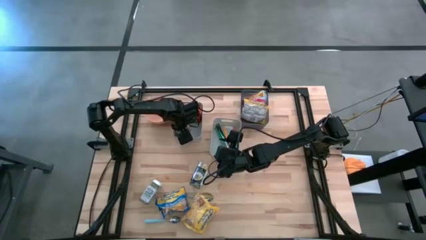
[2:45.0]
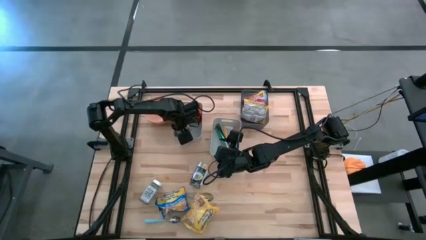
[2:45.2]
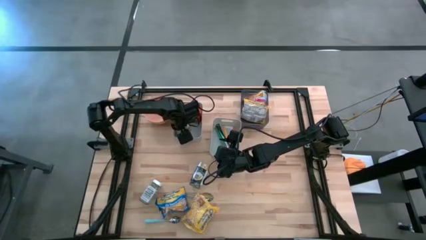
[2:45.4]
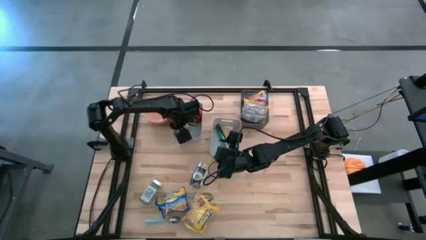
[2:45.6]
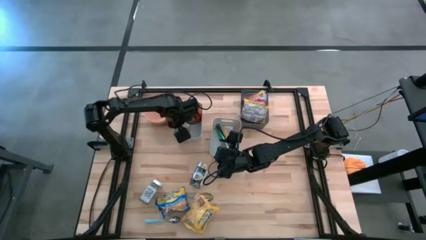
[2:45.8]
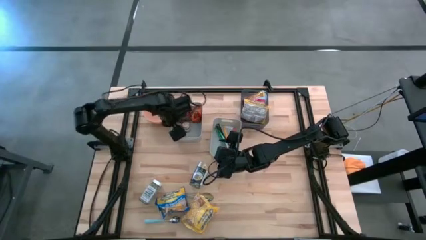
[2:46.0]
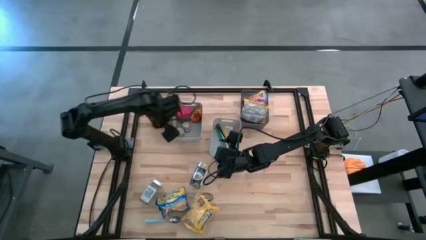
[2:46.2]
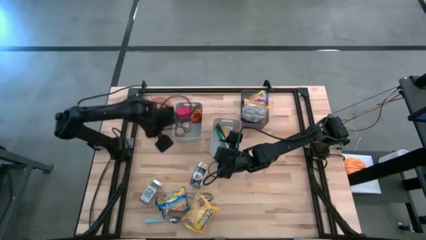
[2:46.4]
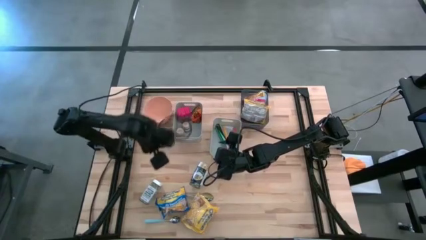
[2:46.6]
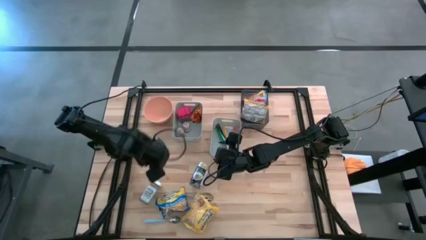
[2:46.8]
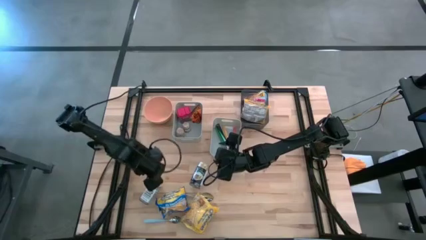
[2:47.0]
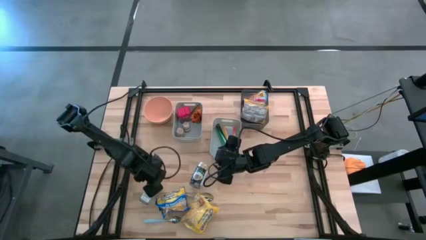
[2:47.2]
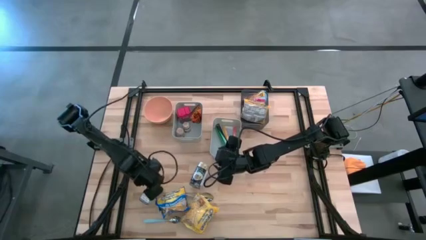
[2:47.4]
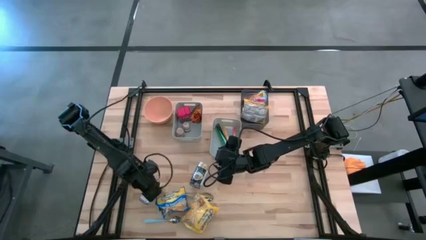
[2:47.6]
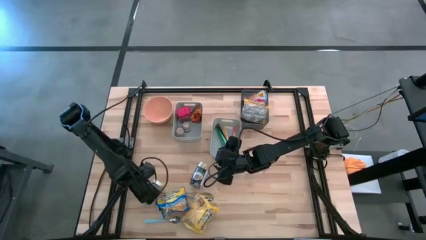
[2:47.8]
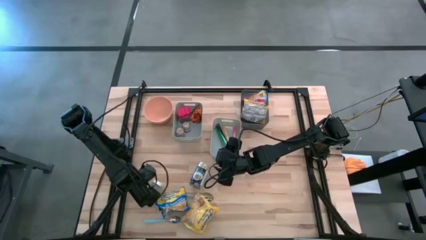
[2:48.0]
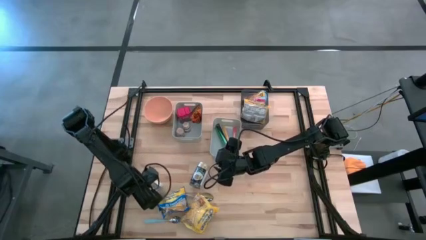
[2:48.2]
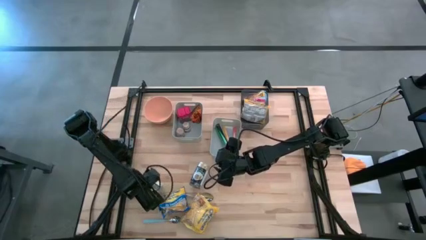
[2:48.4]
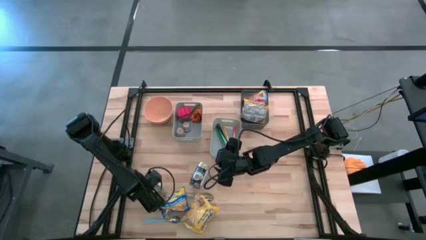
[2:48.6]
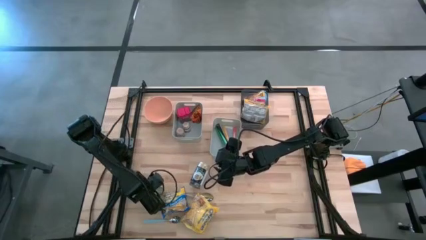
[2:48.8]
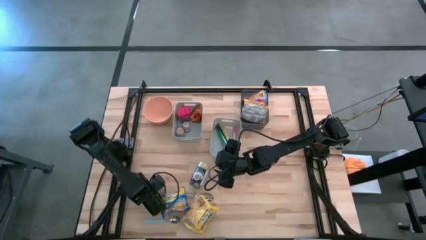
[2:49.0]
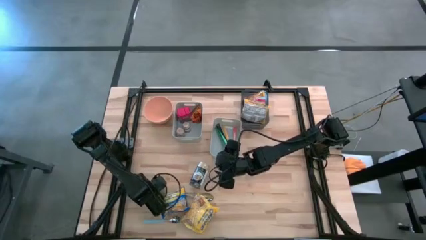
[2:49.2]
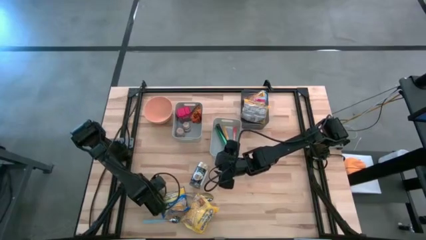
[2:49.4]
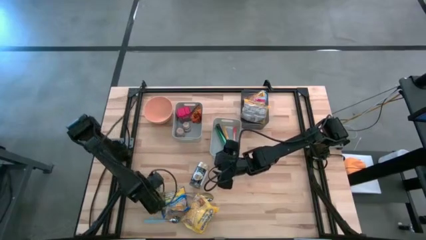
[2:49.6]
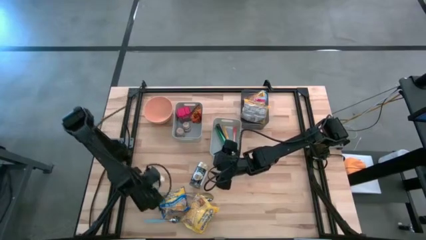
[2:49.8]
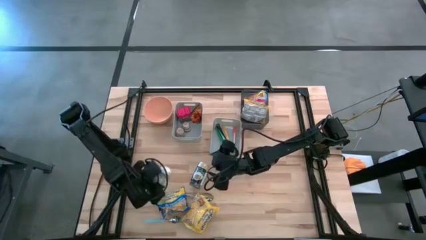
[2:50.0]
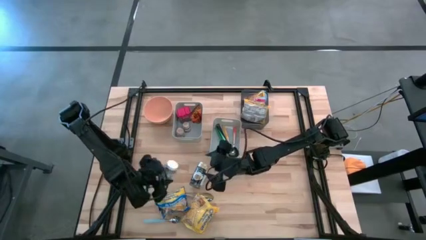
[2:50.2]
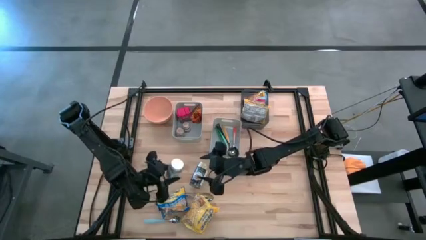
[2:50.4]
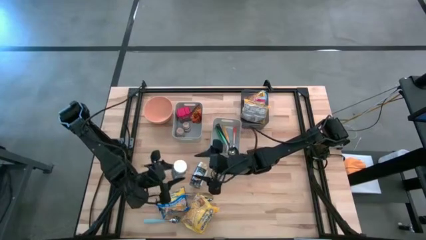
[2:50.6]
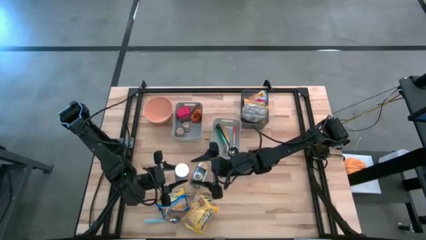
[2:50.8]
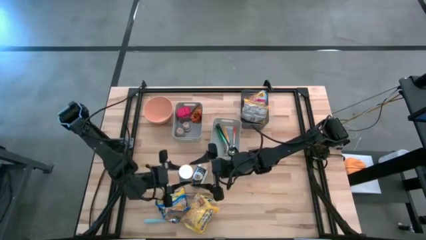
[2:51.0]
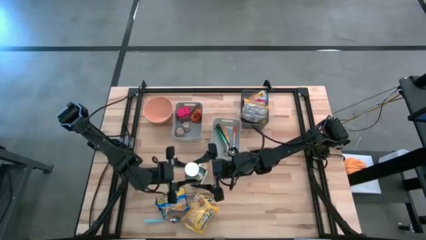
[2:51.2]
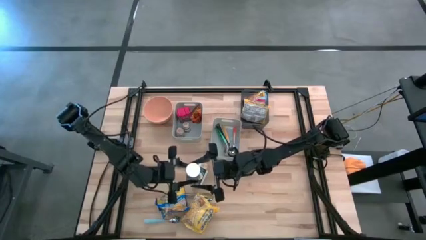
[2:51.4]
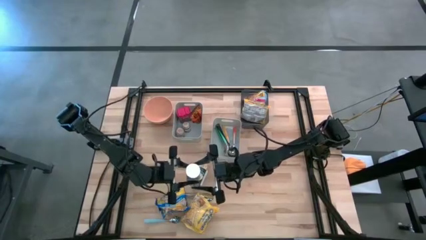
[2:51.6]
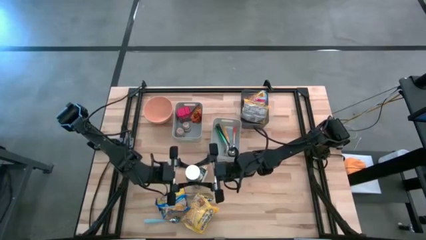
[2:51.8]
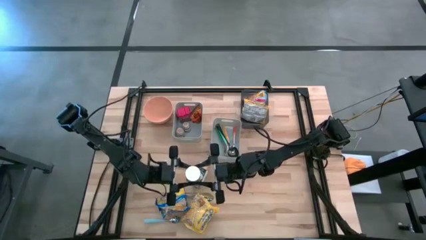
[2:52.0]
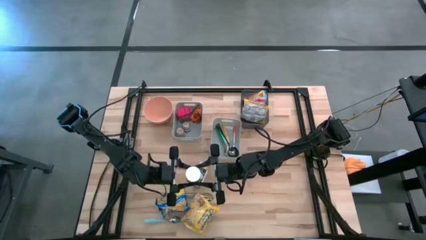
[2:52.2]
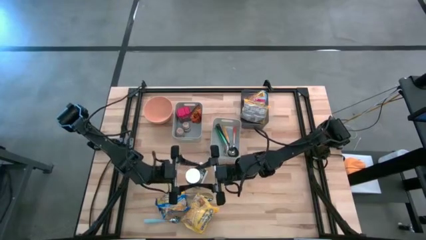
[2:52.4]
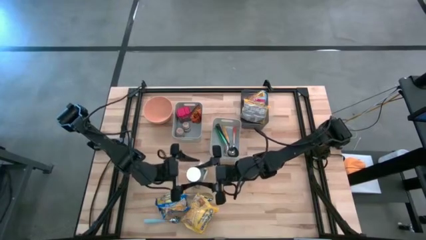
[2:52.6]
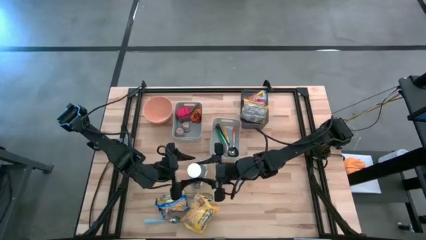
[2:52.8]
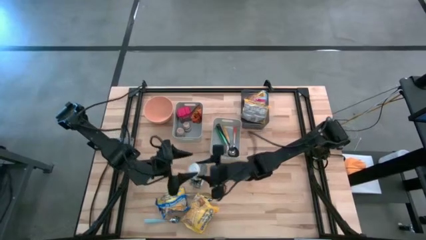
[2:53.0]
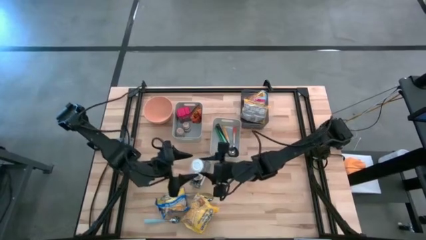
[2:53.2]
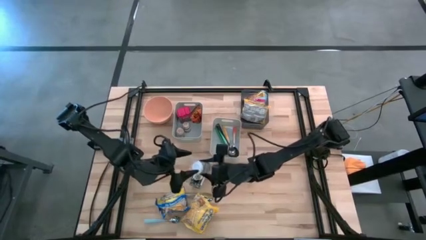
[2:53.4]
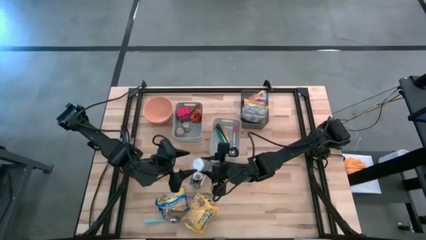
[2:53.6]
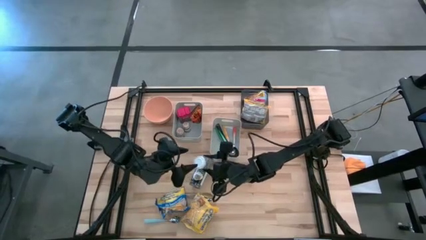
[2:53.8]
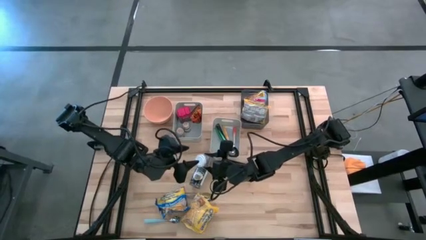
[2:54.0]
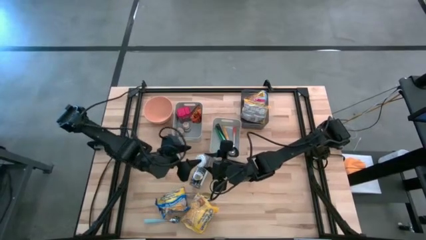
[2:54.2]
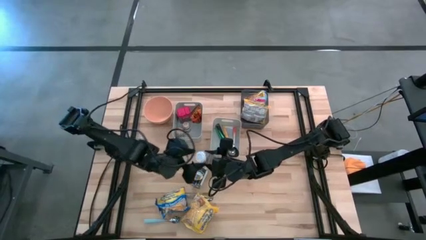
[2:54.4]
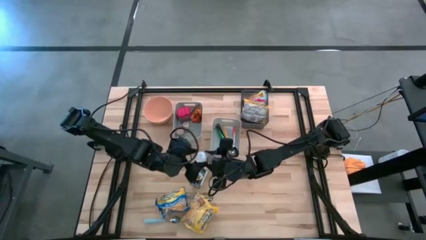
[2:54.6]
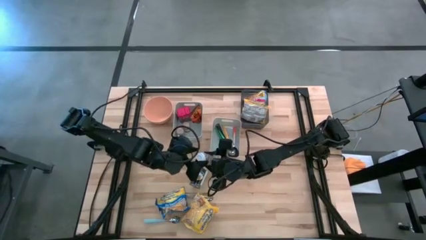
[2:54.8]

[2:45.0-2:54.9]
Put the white seasoning bottle into the left gray bin
